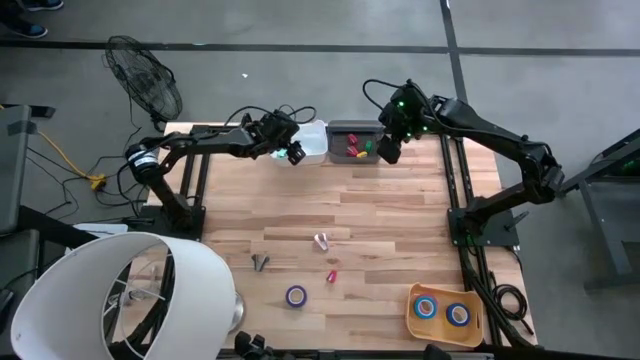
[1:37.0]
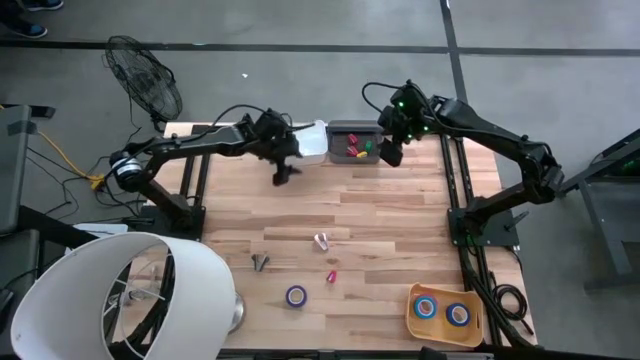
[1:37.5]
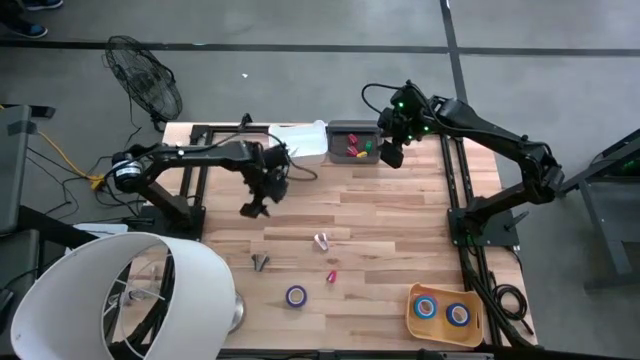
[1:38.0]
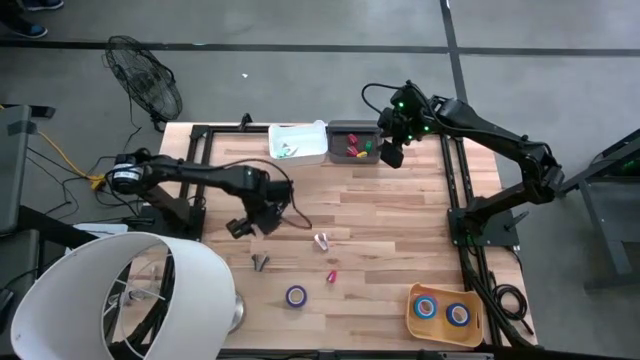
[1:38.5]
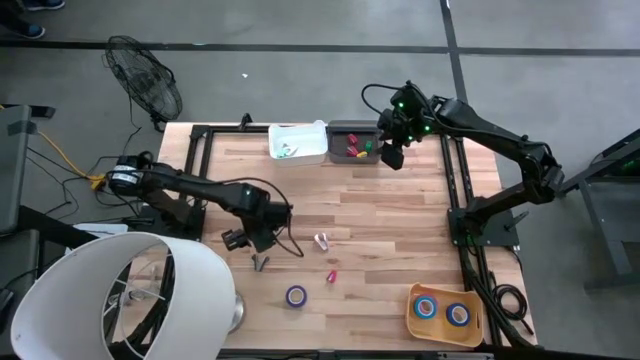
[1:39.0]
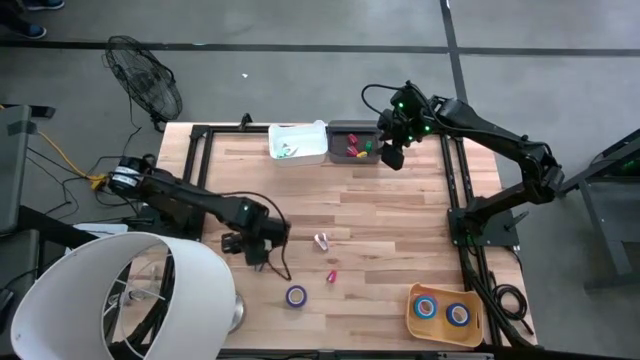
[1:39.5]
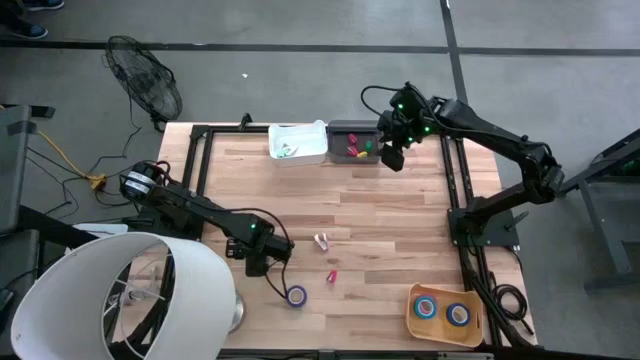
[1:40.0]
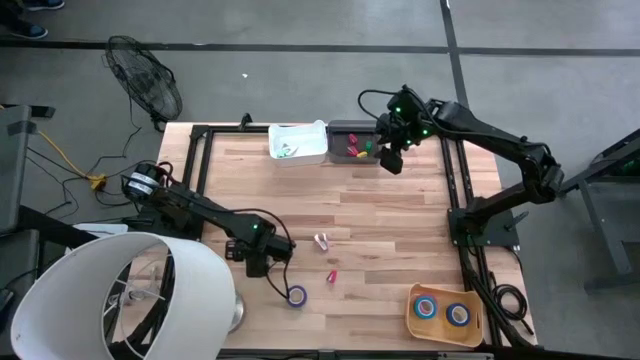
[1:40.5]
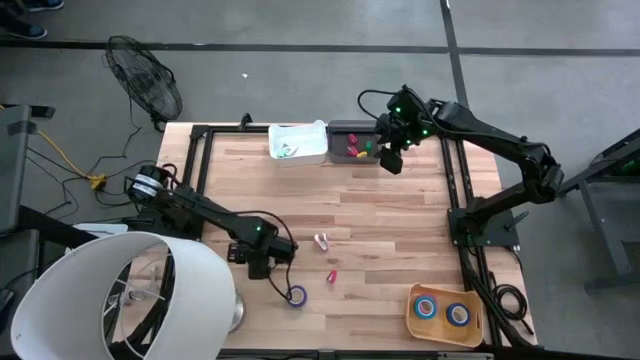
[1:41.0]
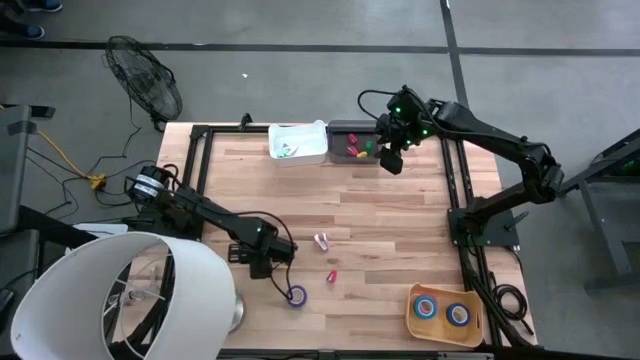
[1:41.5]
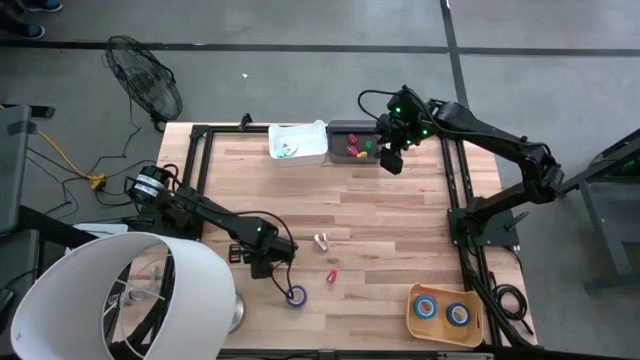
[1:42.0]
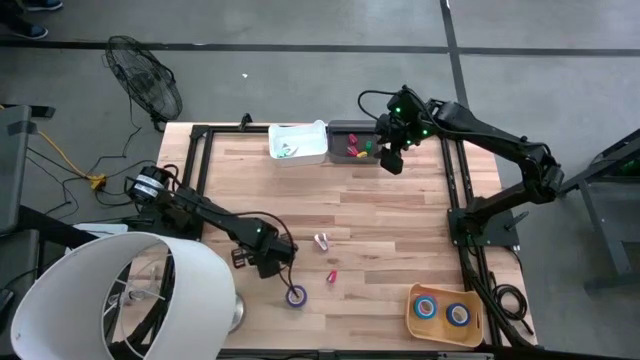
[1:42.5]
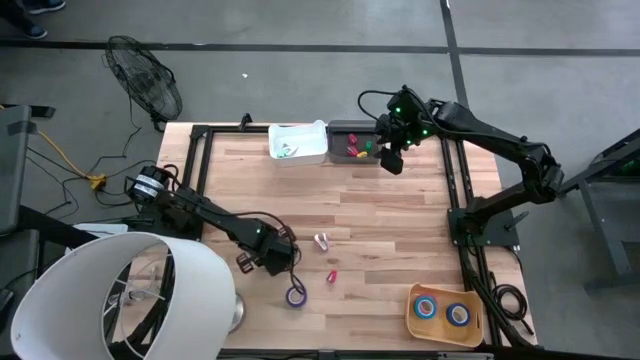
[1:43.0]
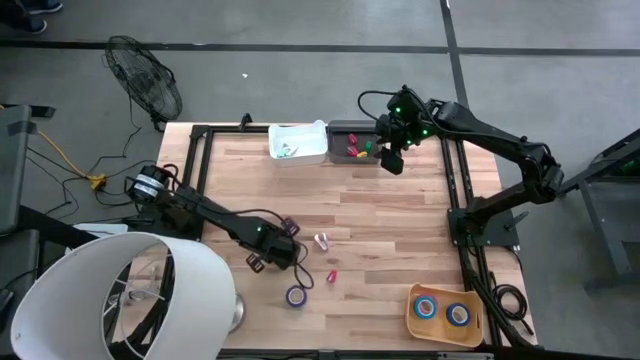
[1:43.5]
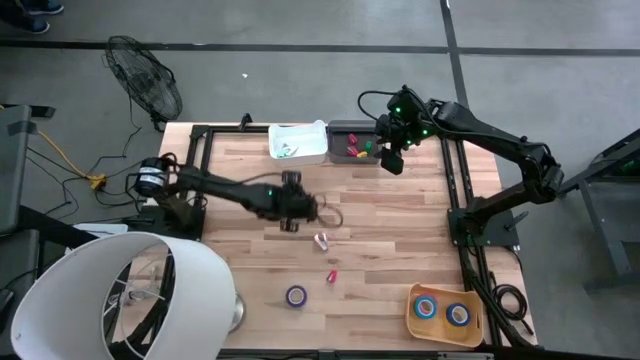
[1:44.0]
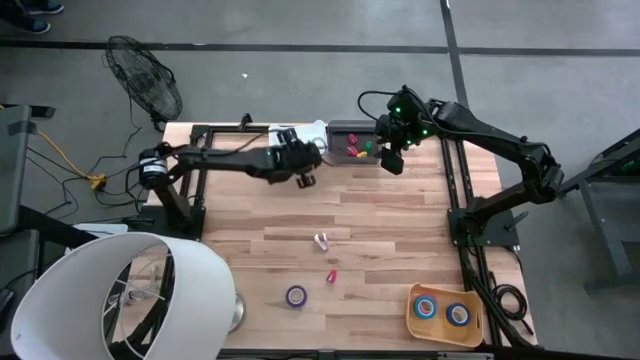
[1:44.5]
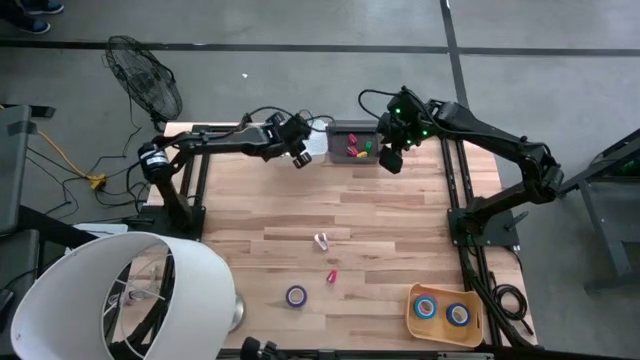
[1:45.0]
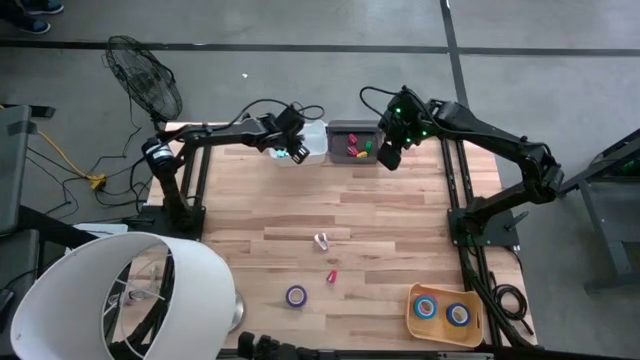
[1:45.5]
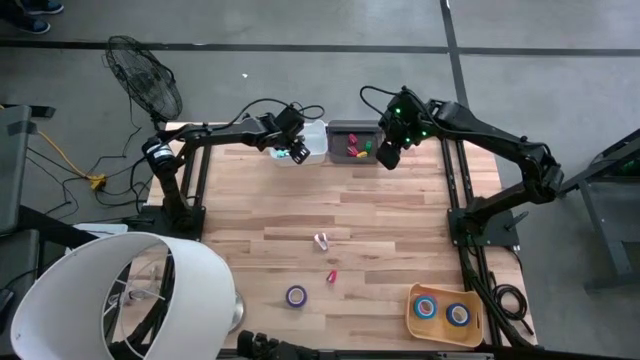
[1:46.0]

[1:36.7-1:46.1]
Task: Pick and place Stapler, Stapler remover, tape
Put the black staple remover into the white bin

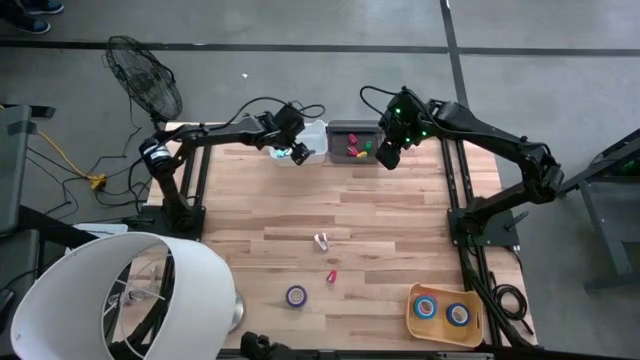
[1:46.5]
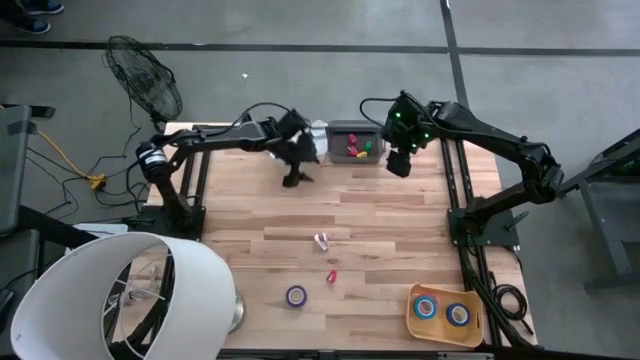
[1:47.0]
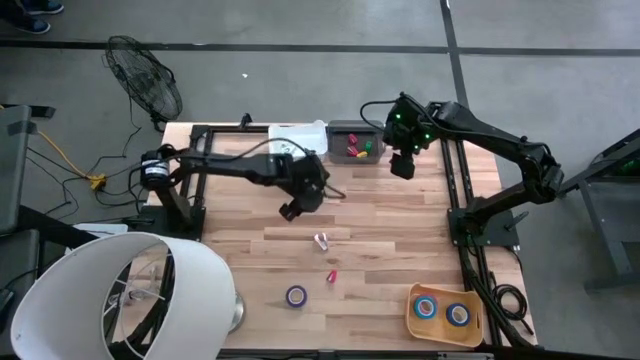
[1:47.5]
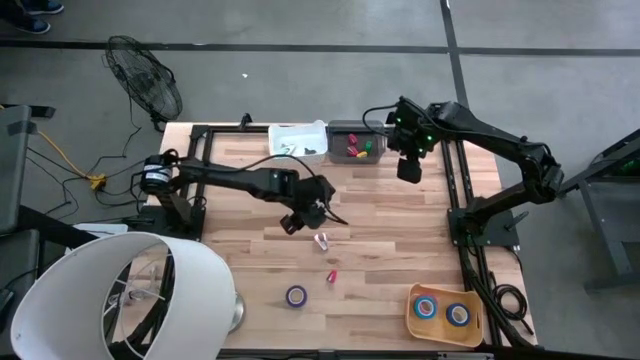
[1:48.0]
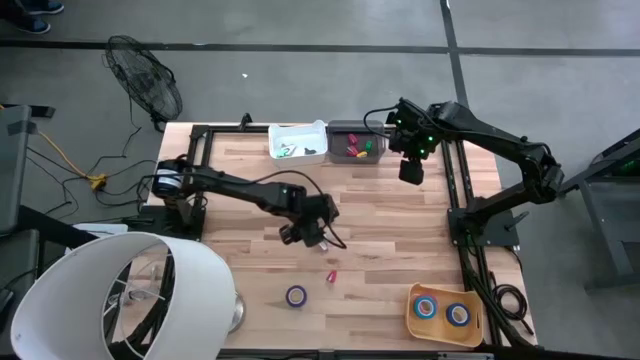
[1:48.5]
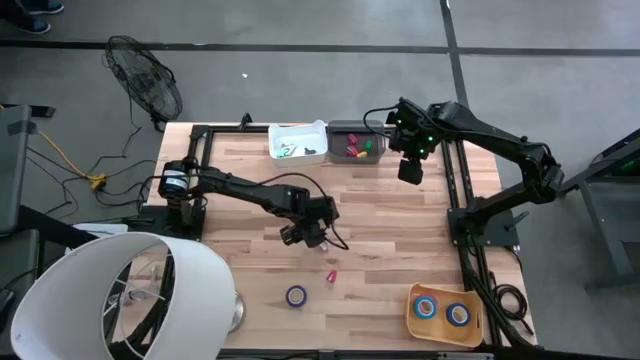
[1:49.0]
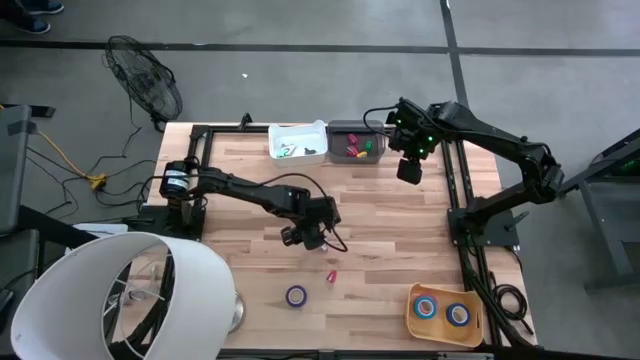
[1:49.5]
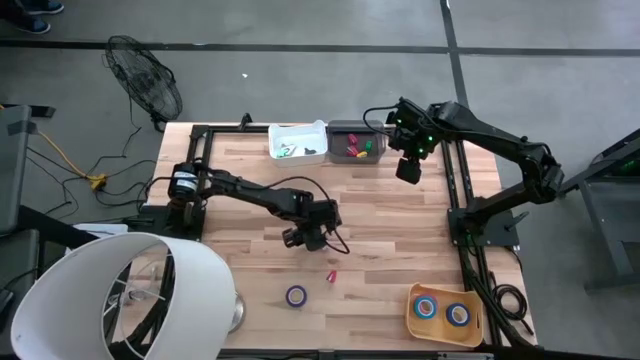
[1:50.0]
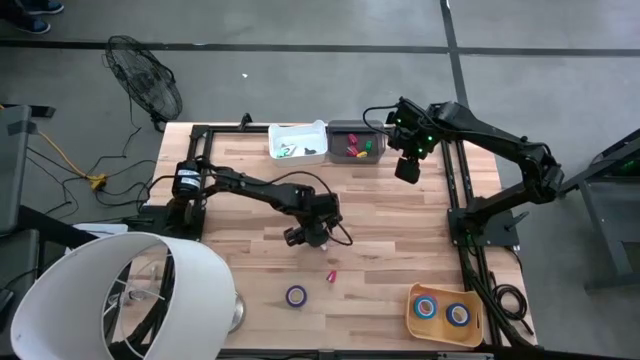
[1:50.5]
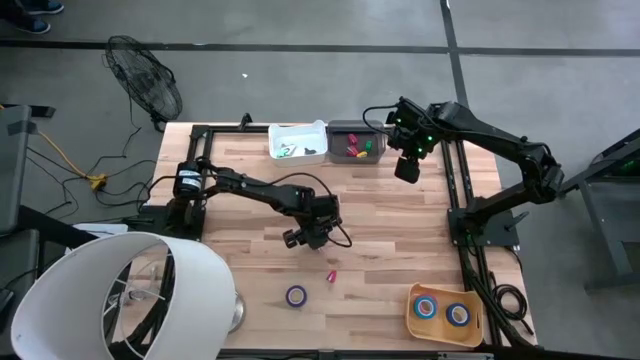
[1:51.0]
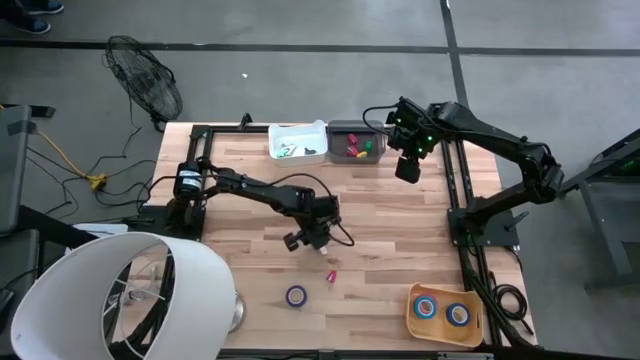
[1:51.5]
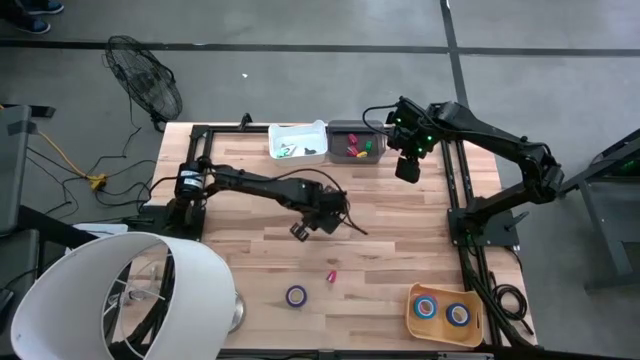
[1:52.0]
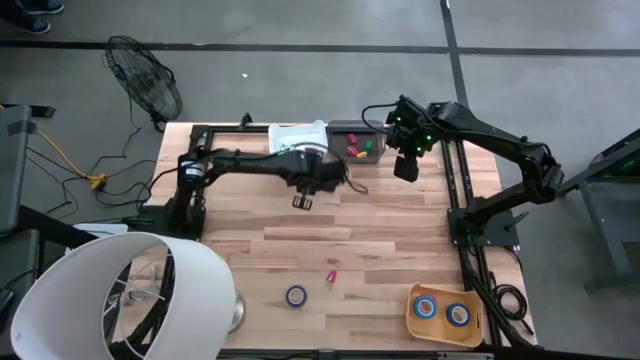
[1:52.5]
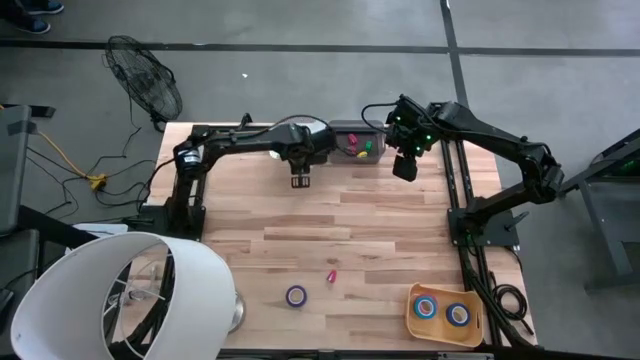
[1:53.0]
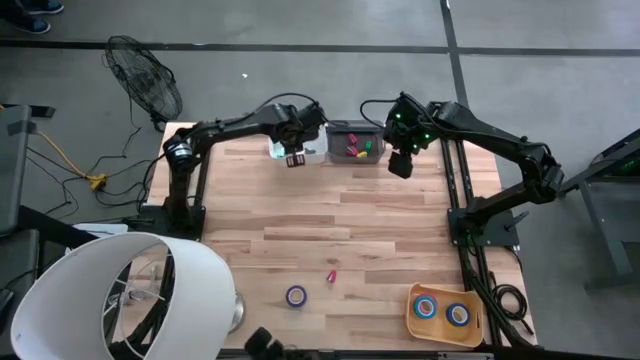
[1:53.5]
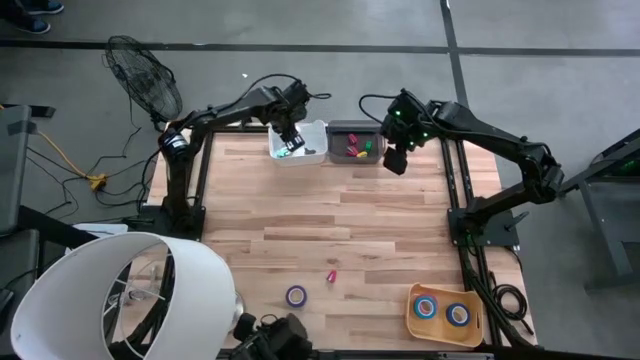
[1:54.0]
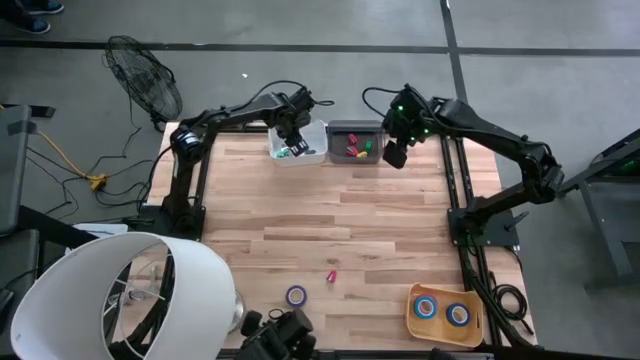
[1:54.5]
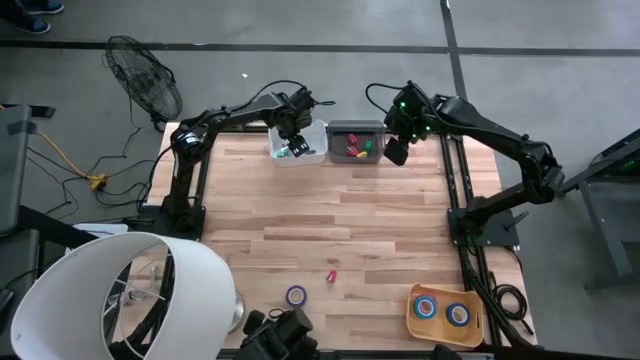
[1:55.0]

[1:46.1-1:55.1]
Put the pink staple remover into the white bin

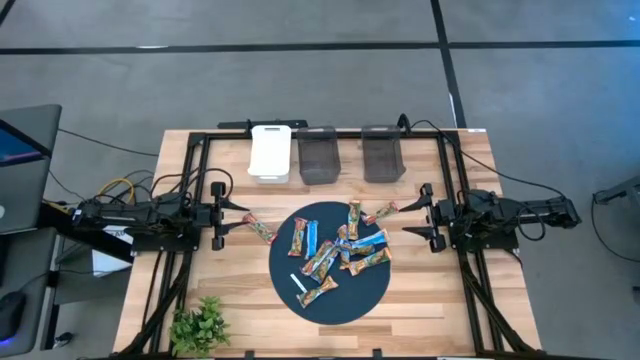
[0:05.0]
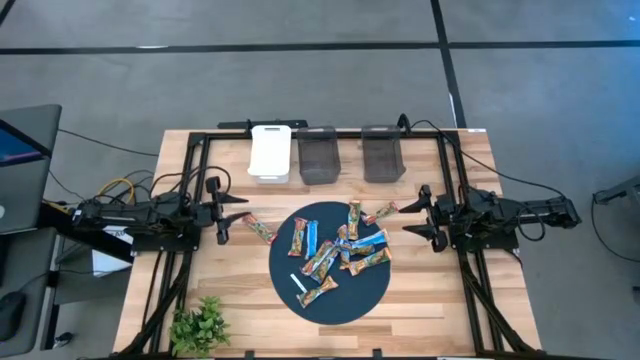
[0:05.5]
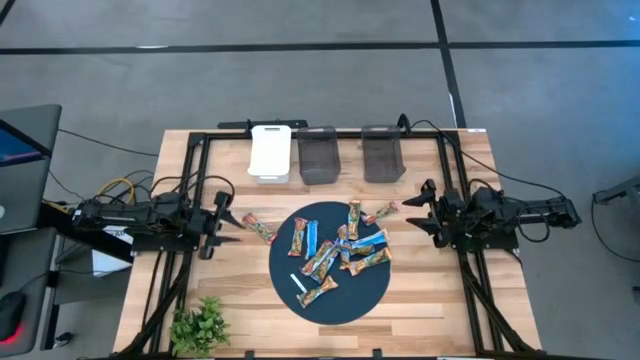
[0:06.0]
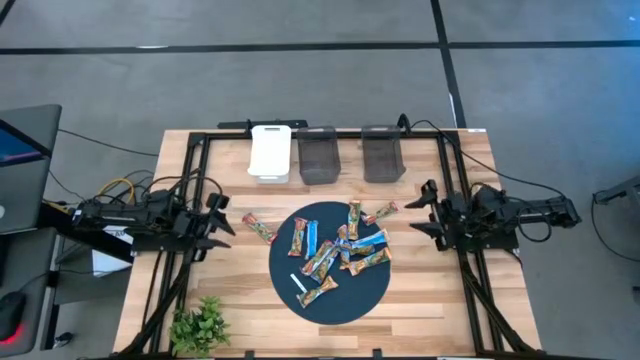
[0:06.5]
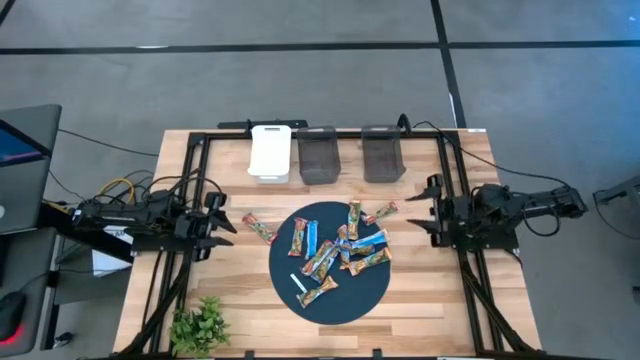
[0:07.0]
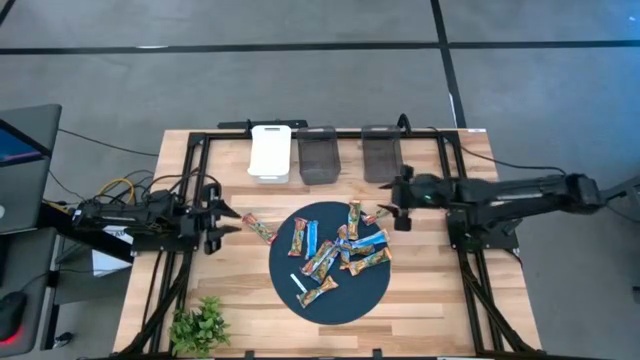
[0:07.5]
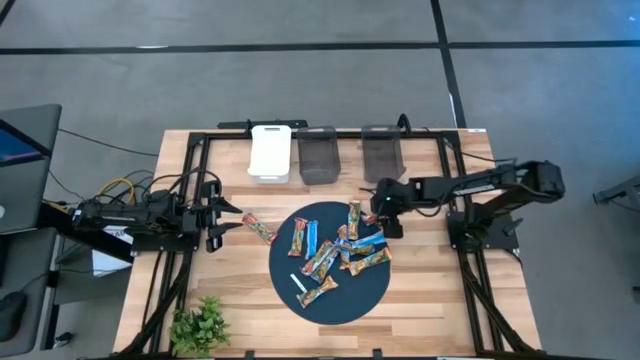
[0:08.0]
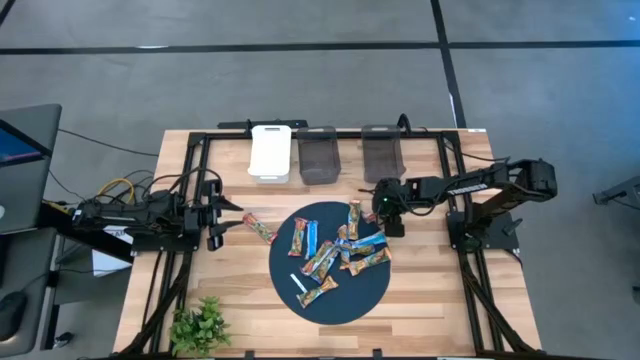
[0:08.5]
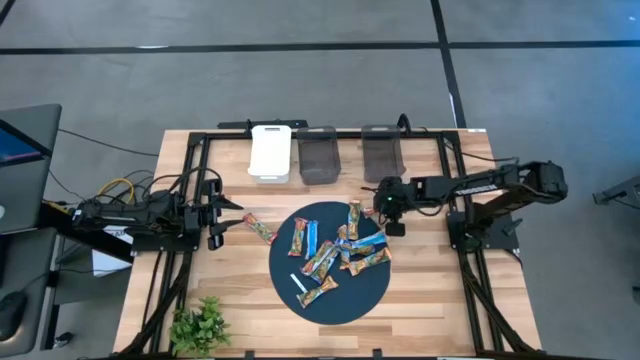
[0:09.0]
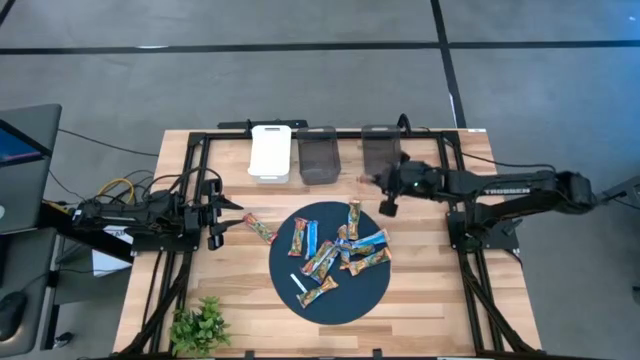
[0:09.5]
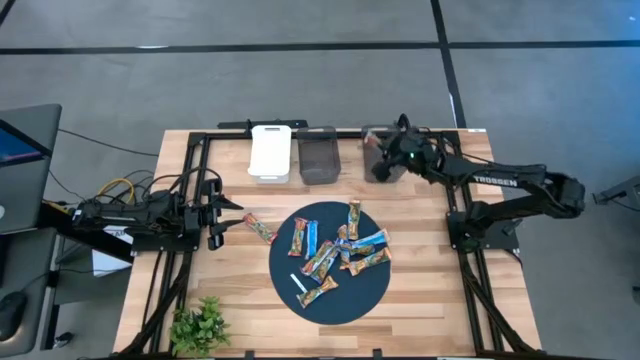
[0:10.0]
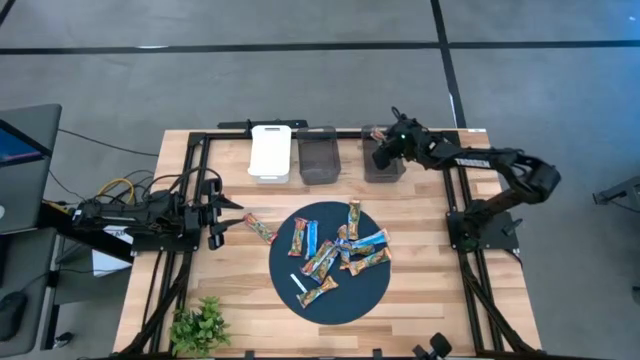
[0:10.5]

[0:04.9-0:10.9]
Task: Pick and place Granola Bars by type
Put the red granola bar into the right black bin
